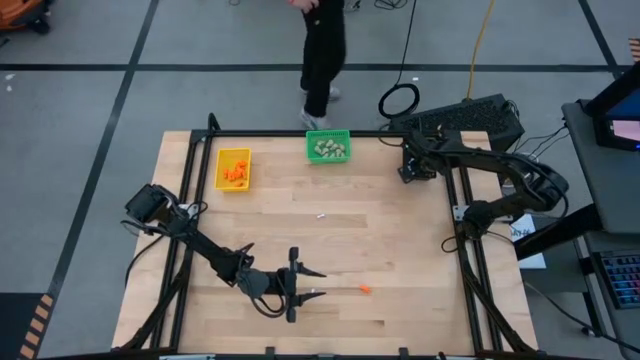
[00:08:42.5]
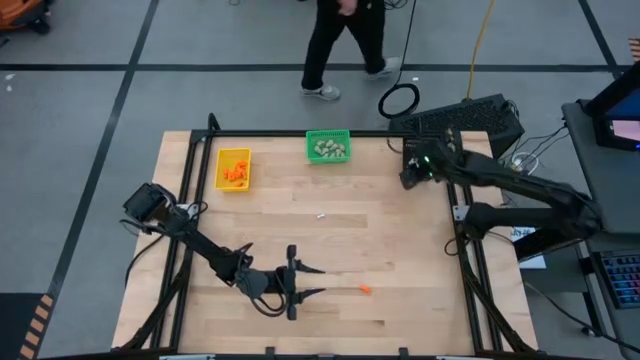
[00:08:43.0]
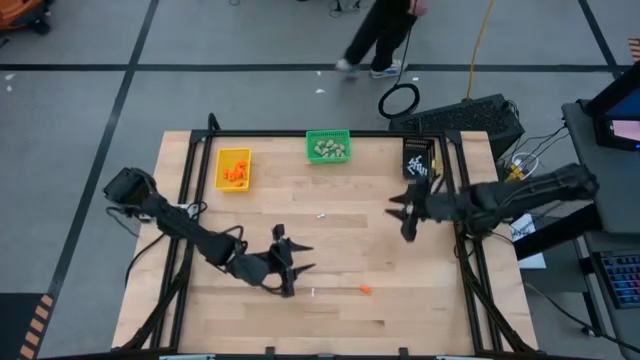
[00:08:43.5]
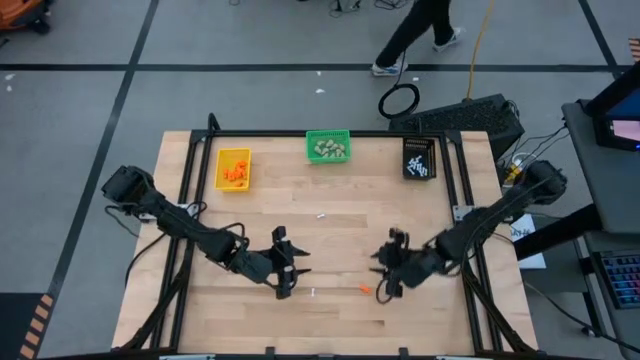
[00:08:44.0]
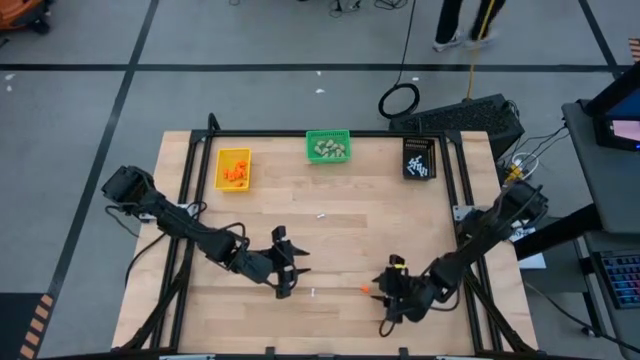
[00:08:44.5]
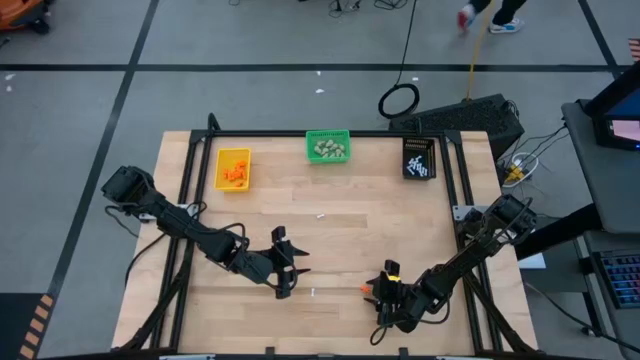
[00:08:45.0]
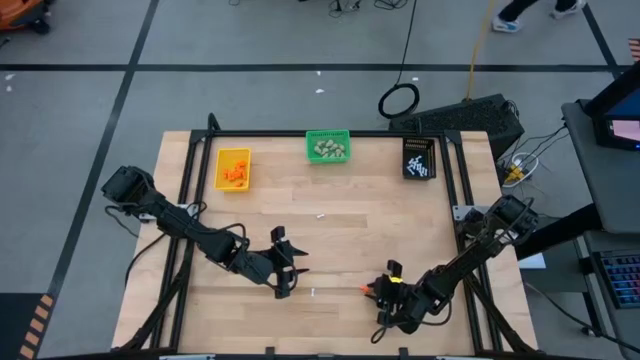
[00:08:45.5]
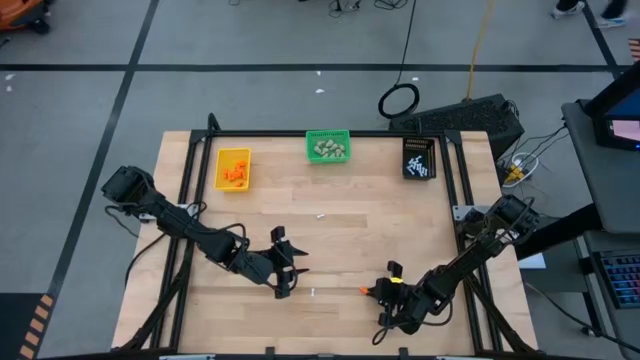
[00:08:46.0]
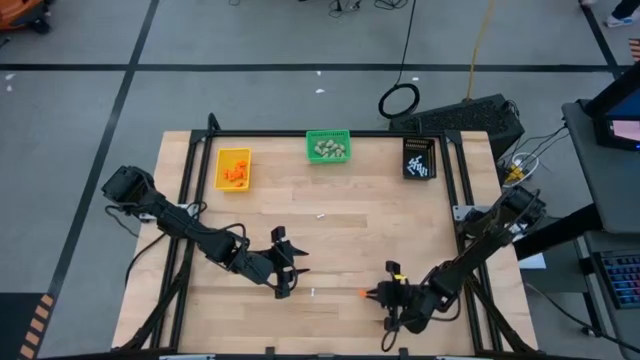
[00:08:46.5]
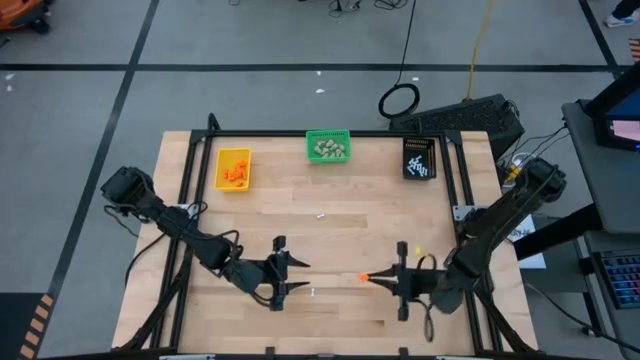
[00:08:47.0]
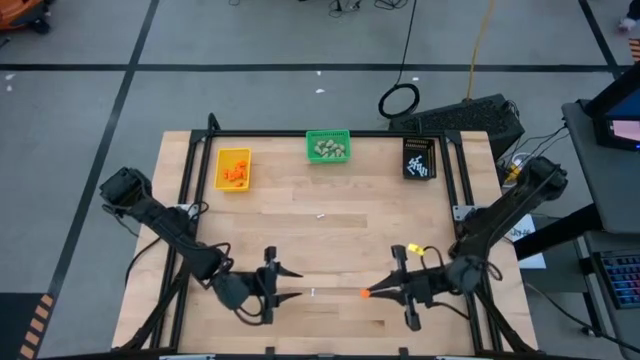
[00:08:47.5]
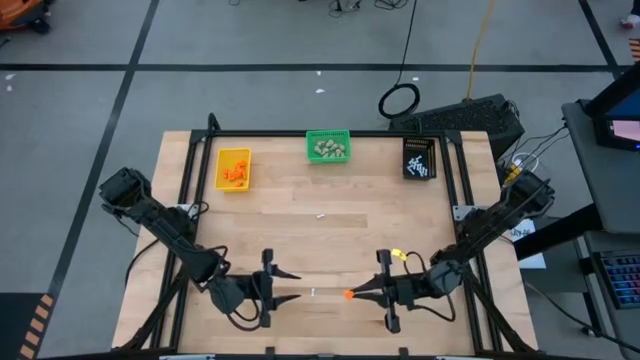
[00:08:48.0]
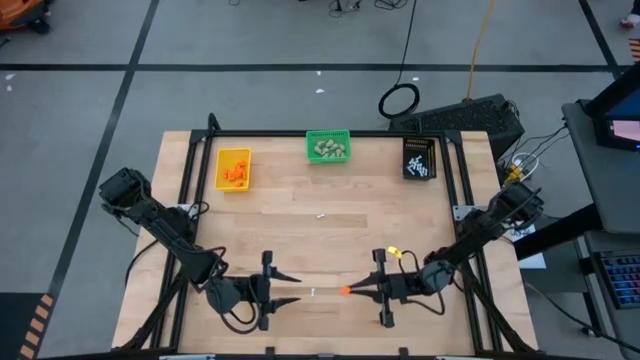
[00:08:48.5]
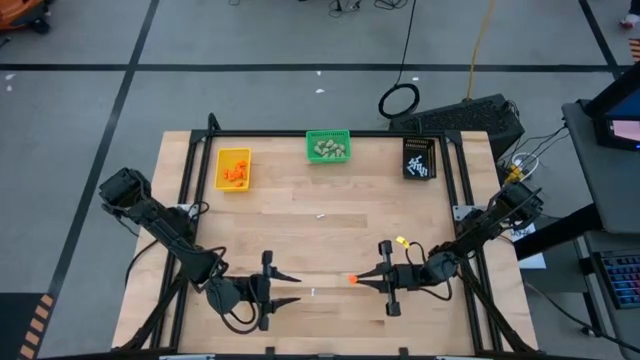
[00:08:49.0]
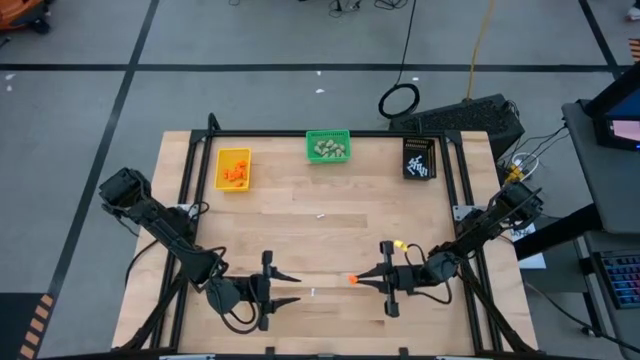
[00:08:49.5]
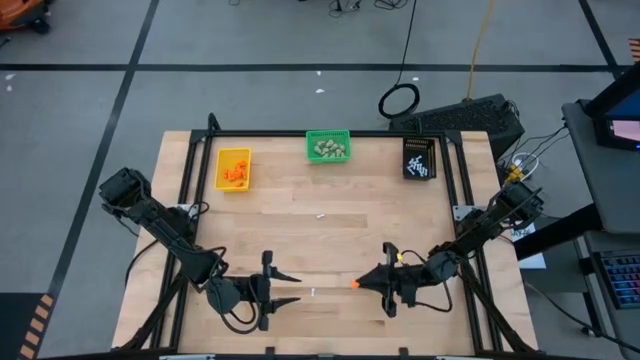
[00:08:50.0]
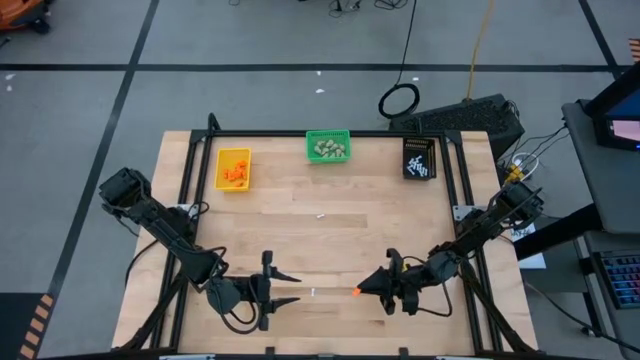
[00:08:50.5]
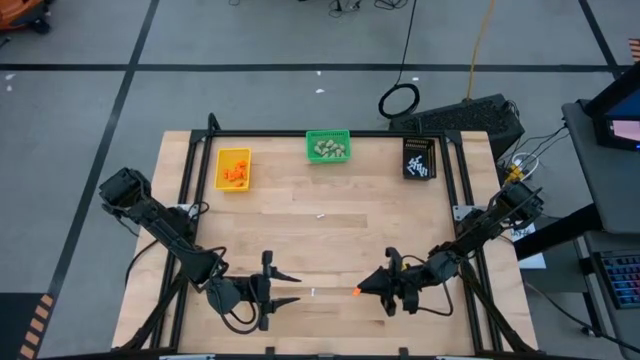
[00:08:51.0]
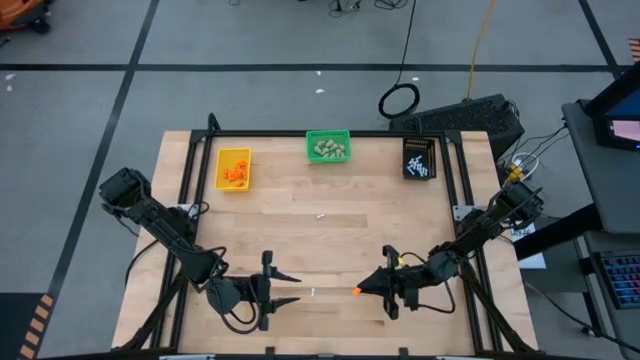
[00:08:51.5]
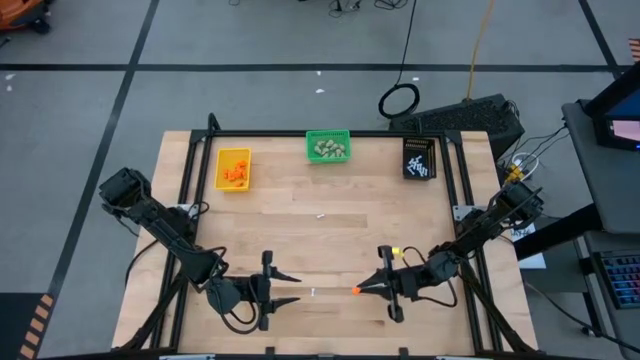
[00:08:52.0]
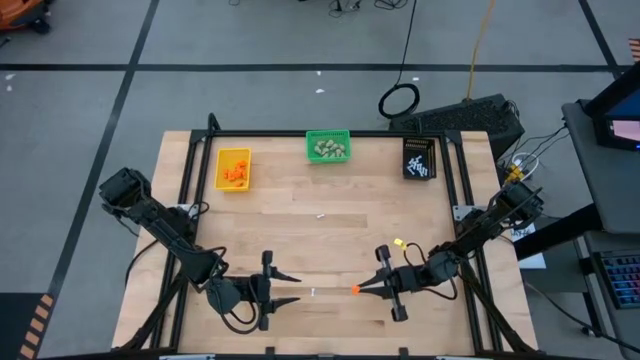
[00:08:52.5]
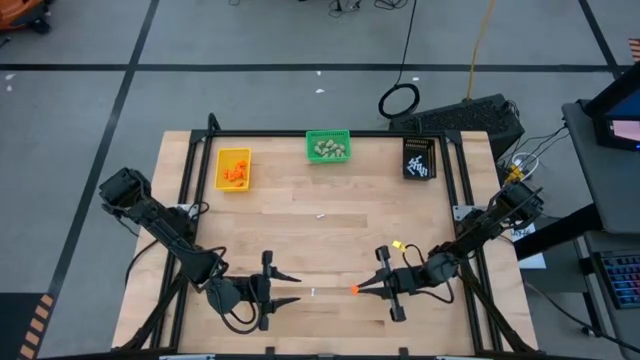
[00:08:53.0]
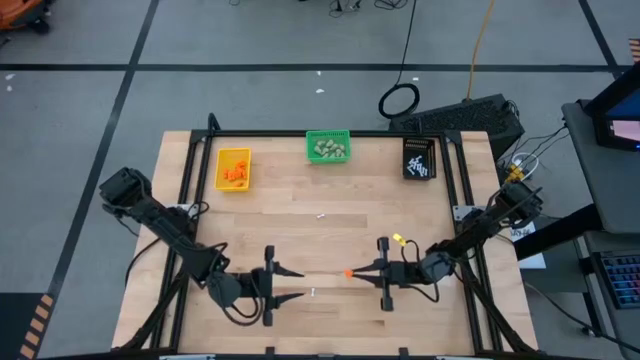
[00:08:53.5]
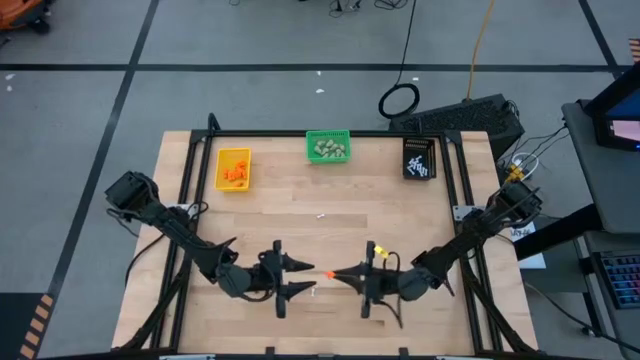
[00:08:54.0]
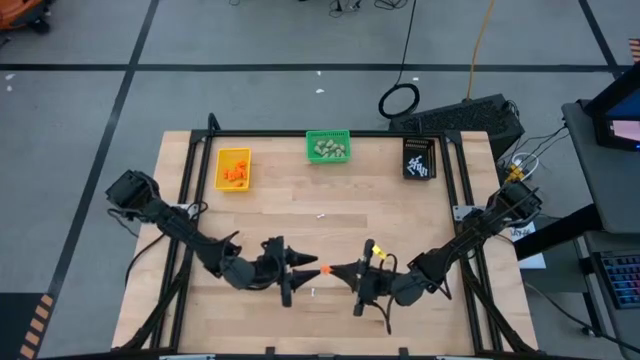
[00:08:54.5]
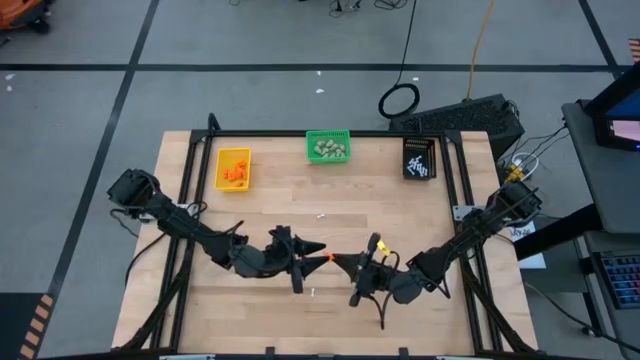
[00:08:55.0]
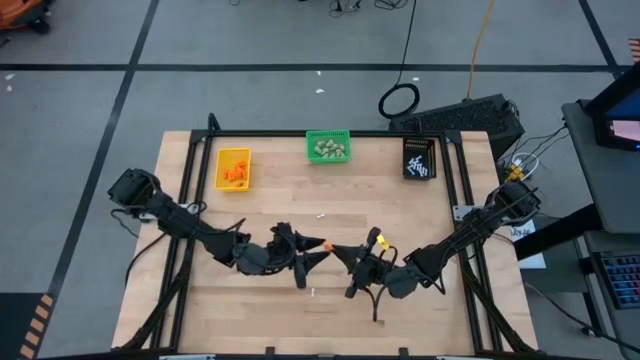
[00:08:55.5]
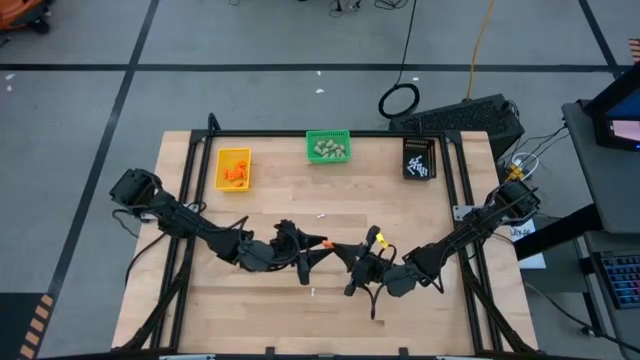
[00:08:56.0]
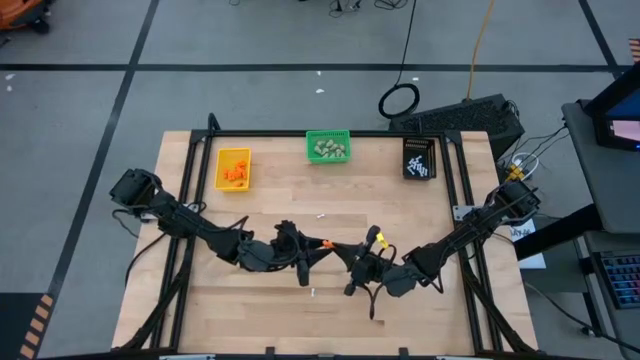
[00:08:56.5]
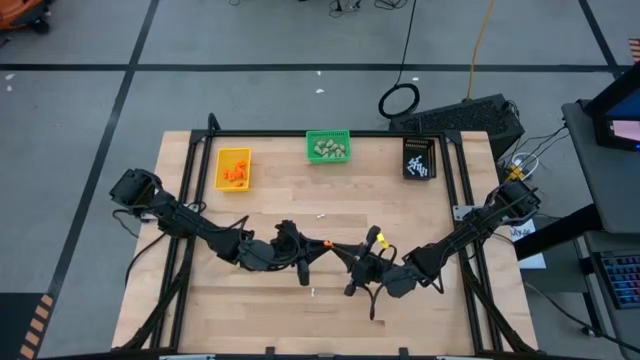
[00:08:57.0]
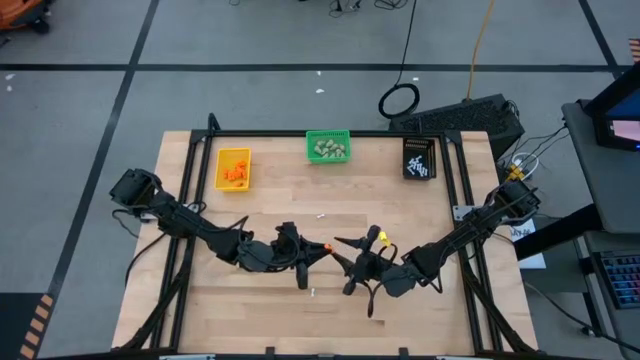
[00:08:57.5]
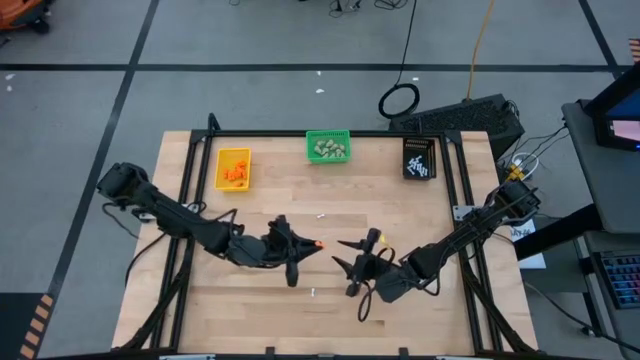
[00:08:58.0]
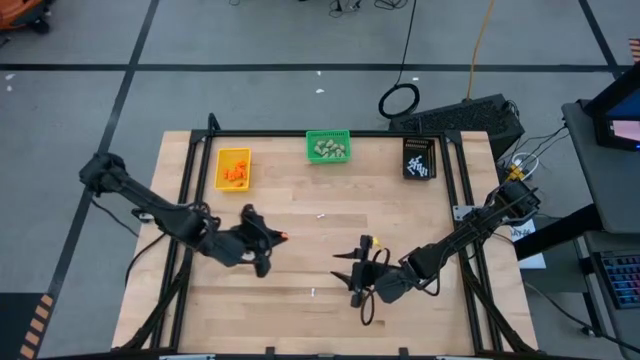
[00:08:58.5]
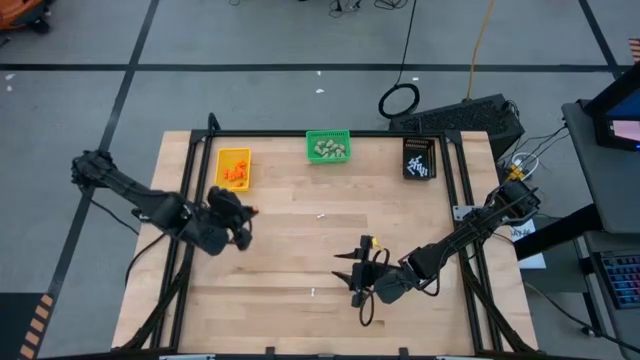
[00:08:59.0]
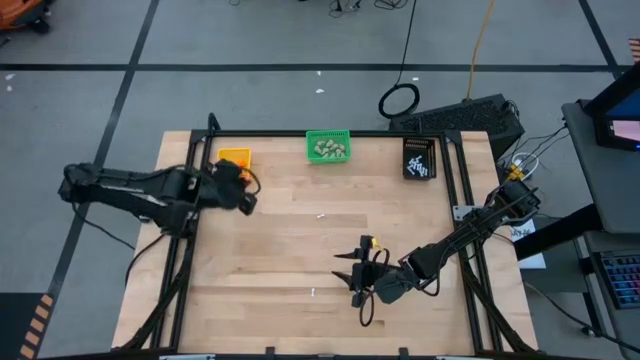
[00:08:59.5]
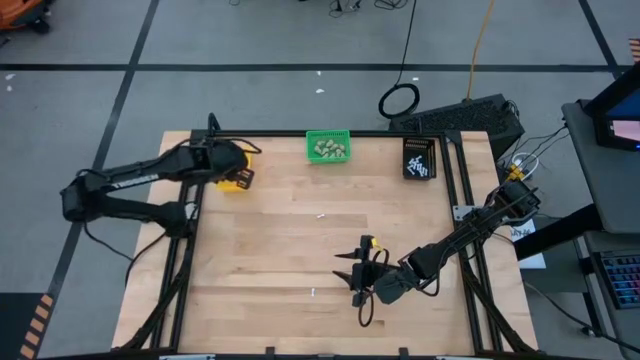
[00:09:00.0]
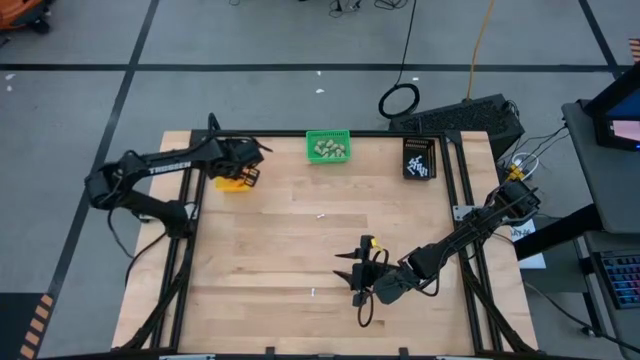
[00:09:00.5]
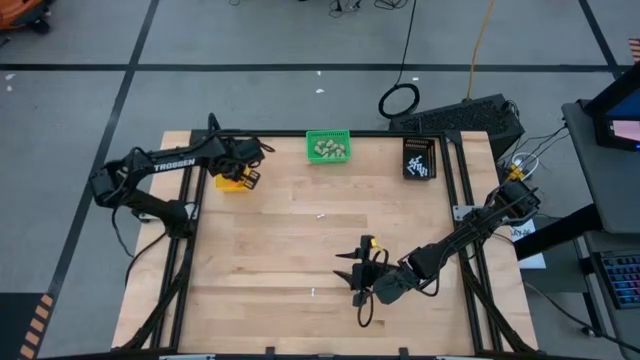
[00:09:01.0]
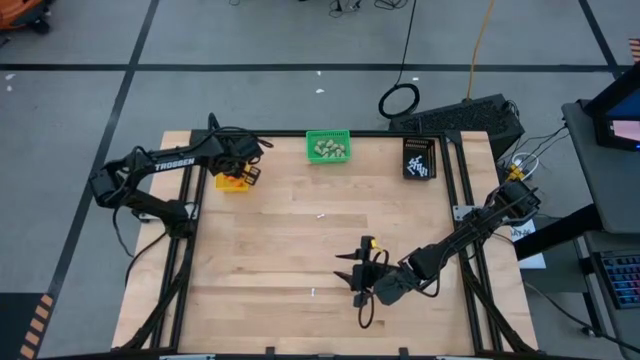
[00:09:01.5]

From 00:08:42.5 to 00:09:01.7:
Task: Sort Halloween decoration
Put the orange skeleton toy into the yellow bin

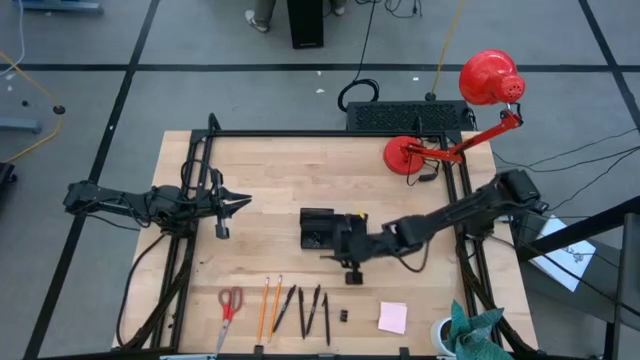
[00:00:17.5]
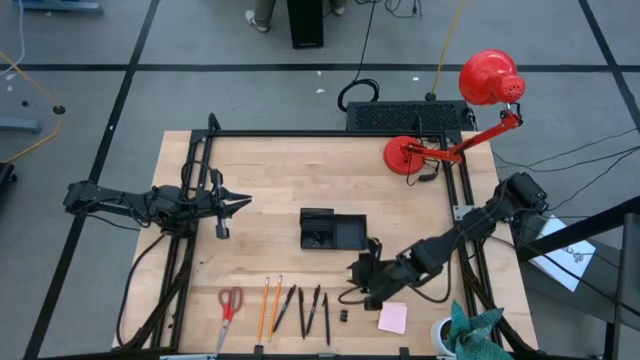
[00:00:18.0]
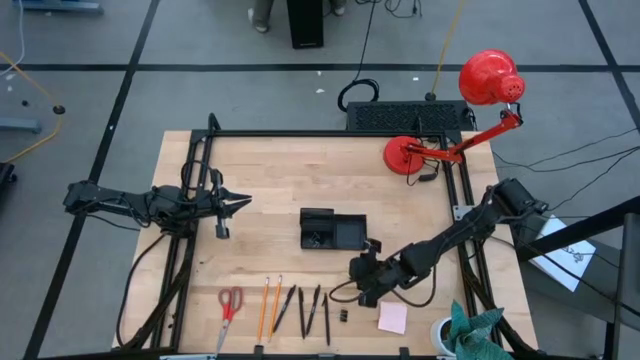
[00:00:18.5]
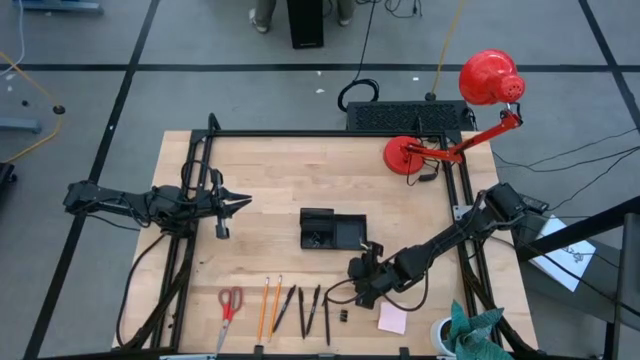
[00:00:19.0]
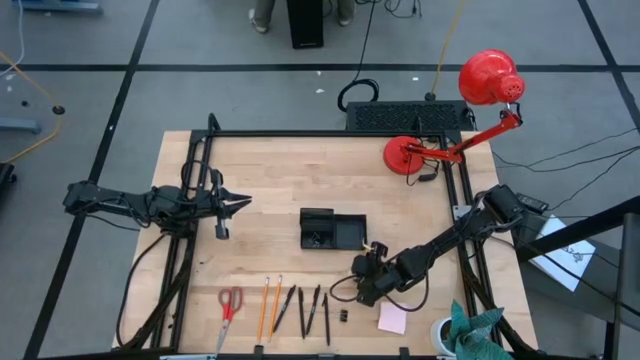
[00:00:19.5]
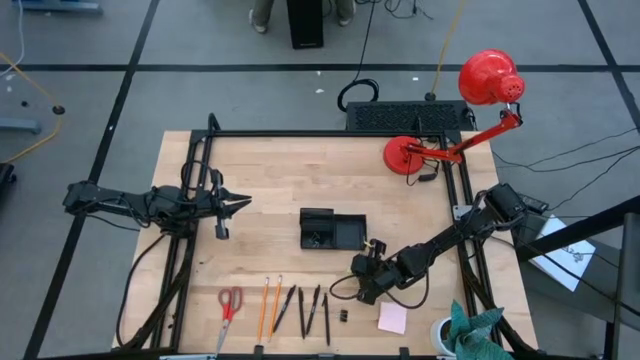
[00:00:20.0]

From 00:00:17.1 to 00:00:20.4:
Task: Pick and place office supplies into organizer
Put the green eraser into the desk organizer
